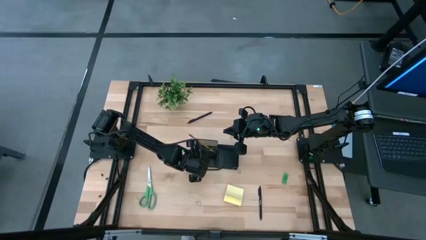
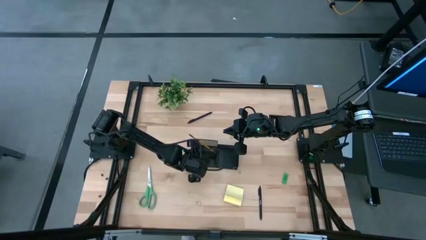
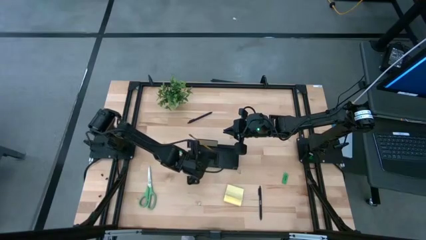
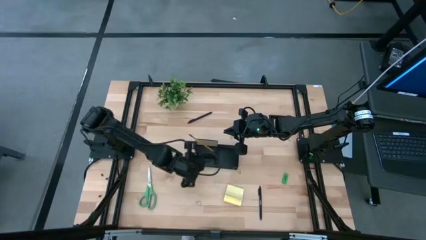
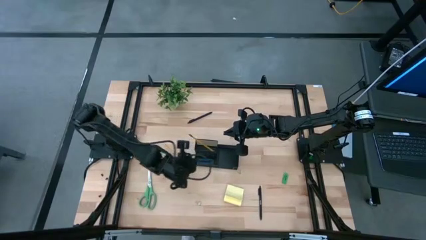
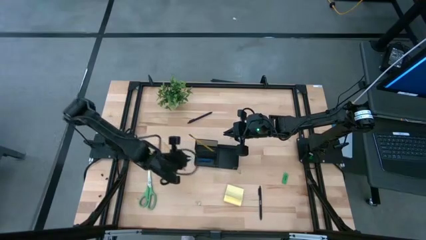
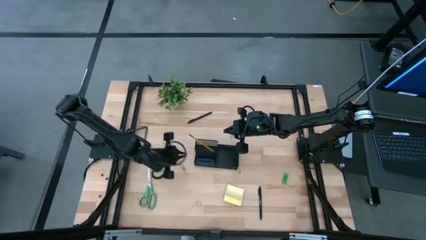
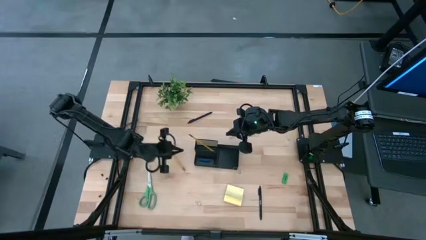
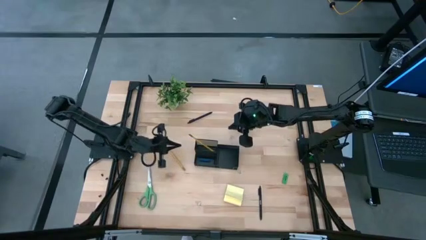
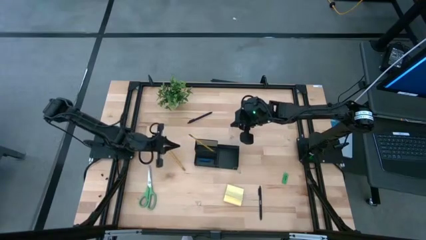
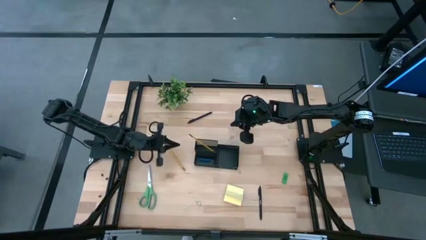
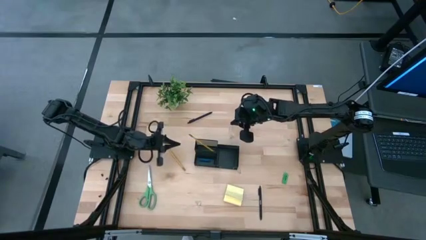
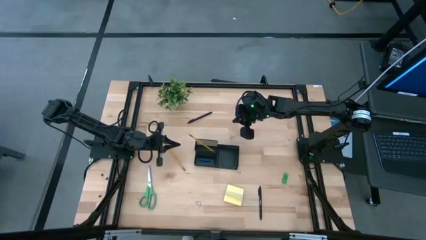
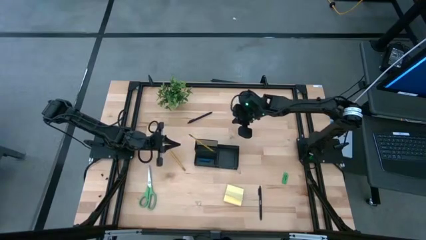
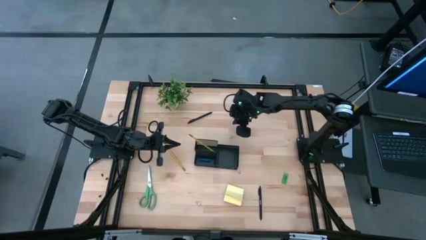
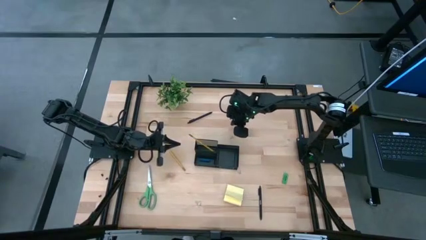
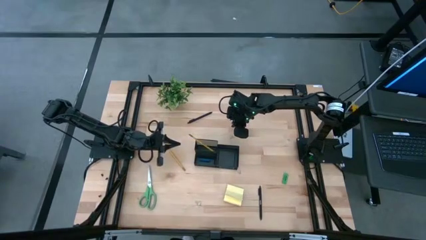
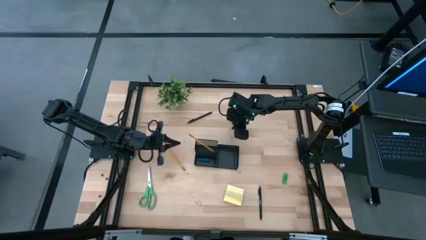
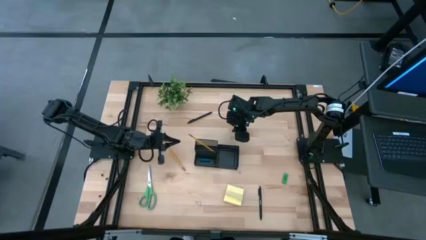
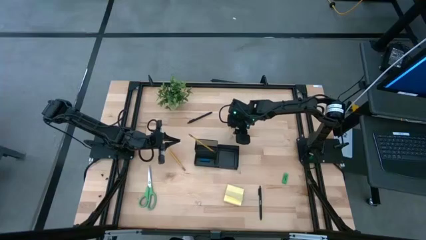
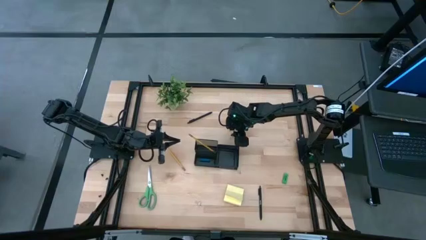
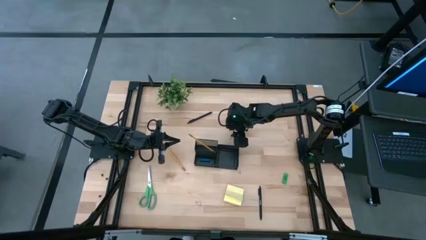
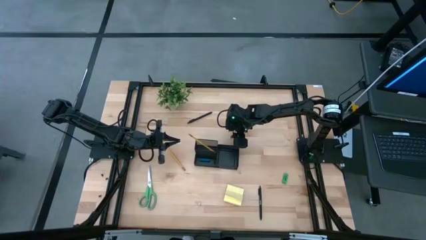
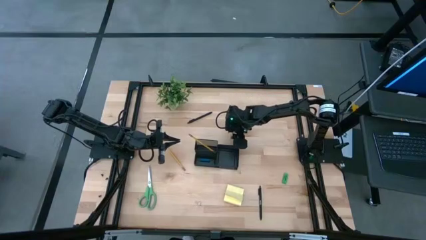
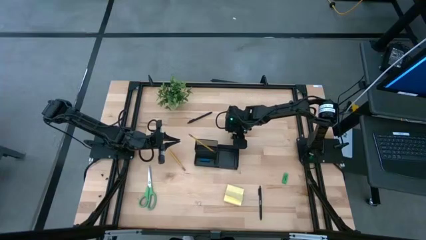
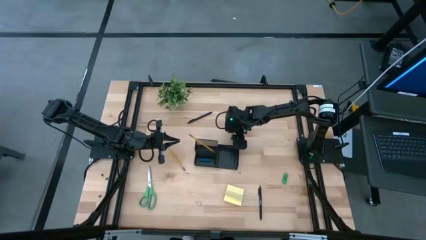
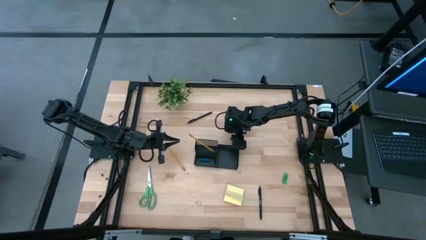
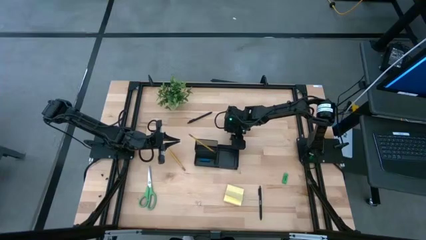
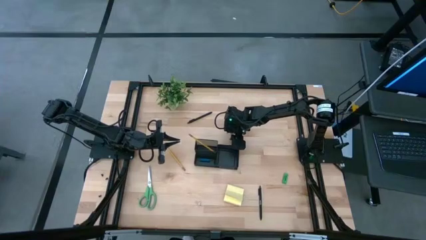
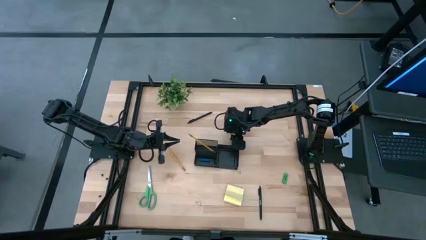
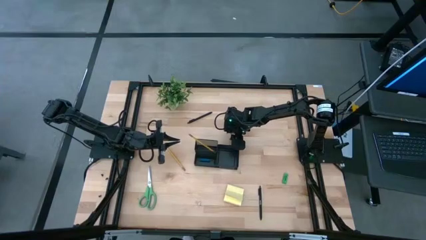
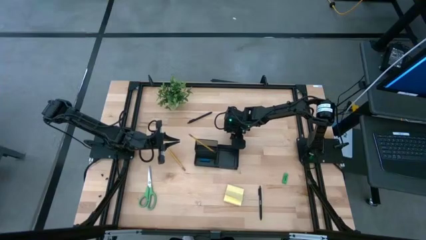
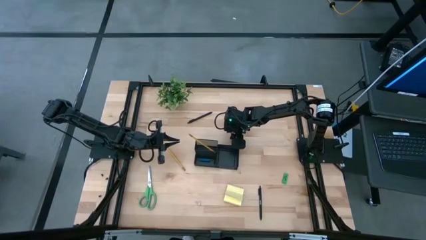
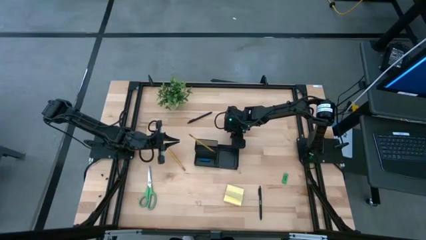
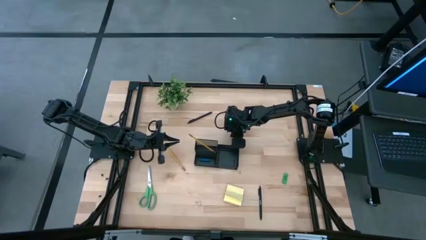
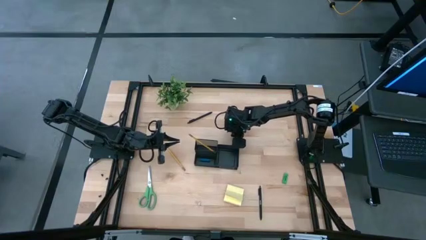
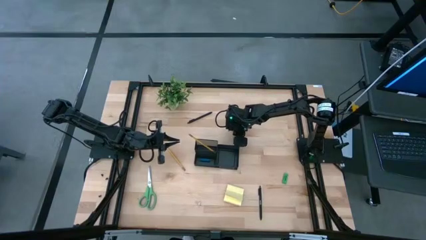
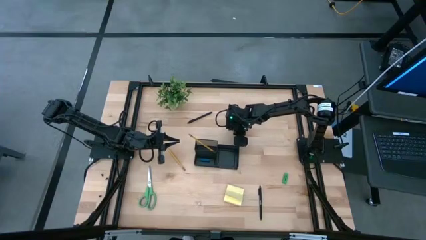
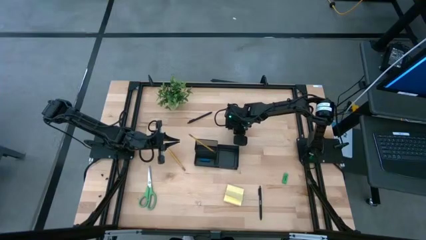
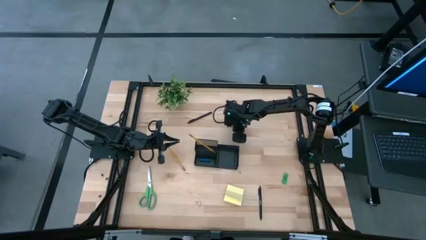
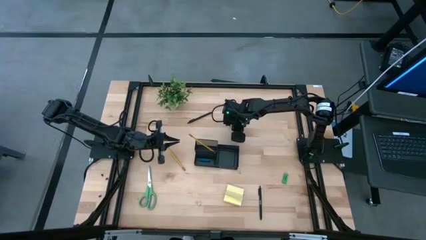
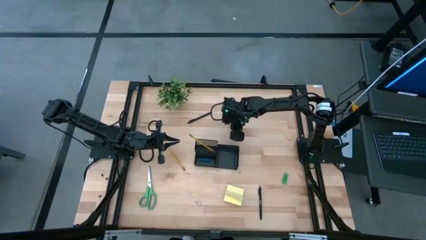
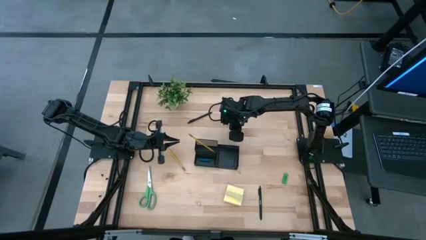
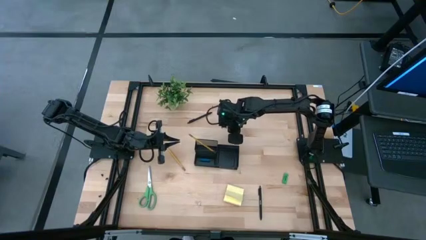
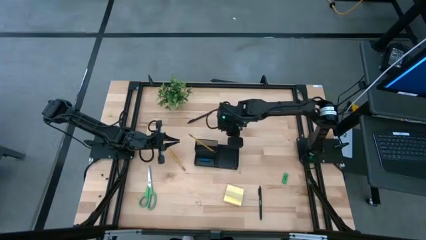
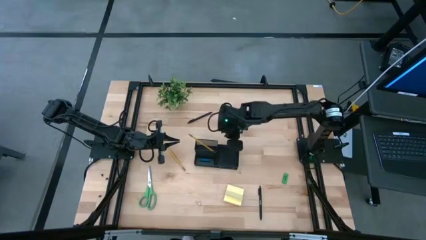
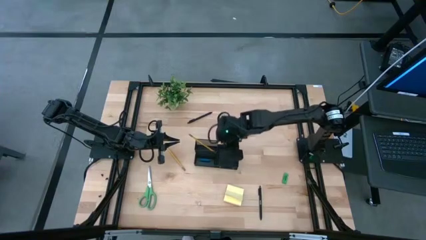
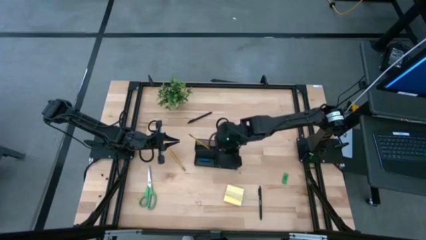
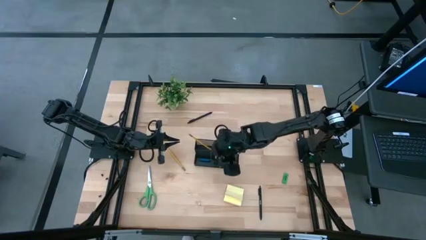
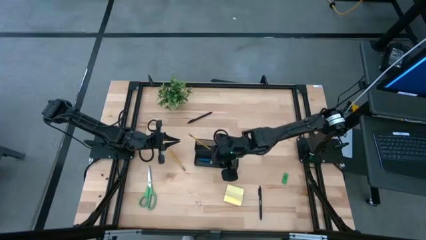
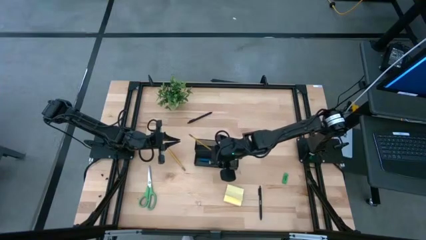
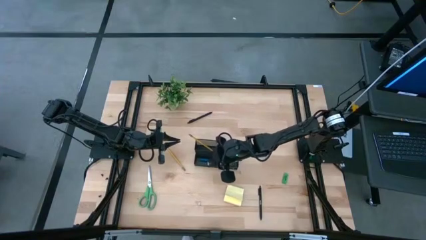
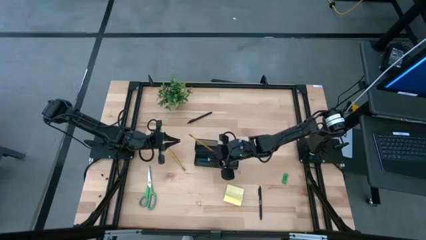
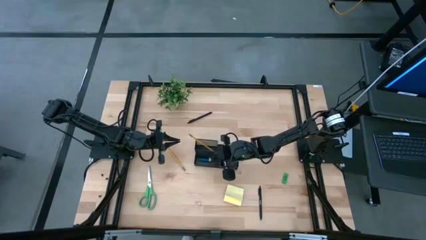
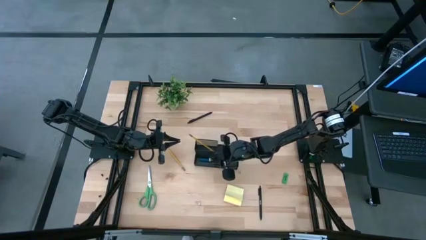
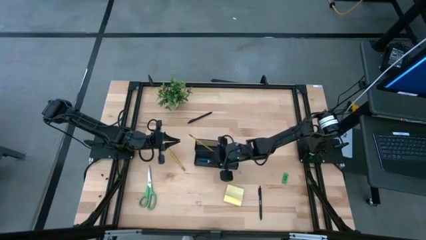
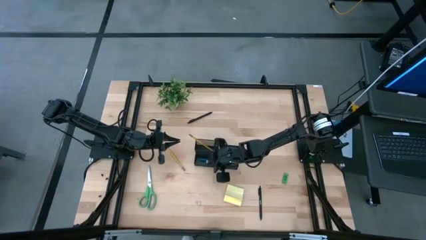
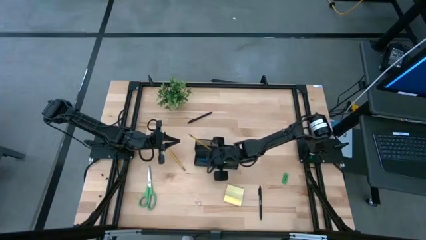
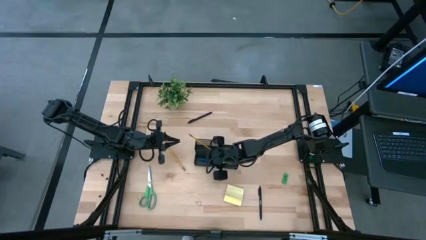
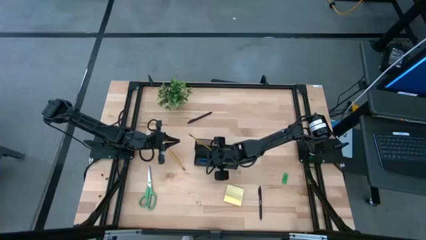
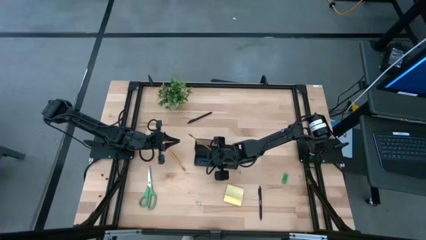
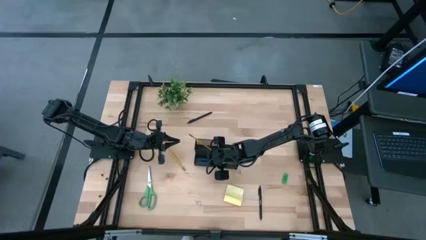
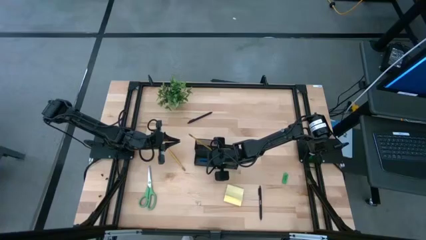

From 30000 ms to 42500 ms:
Task: Pick and place office supplies into organizer
Put the top yellow binder clip into the black desk organizer

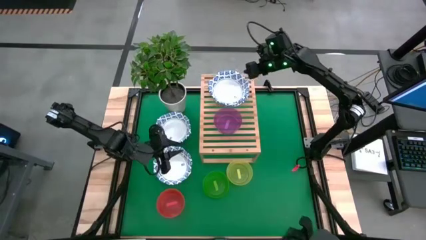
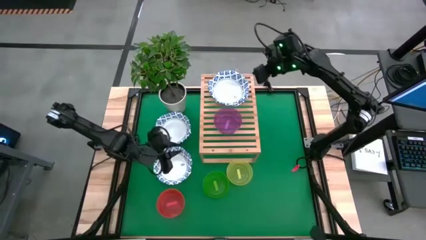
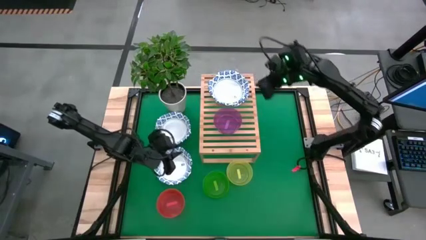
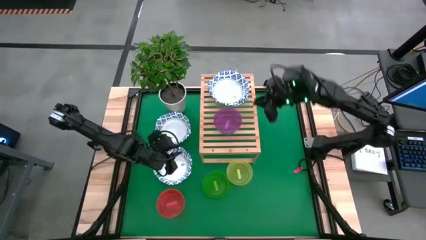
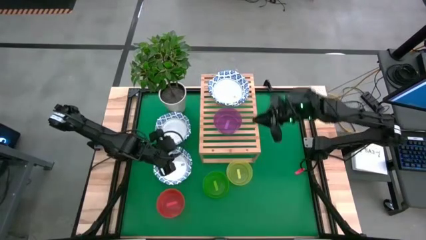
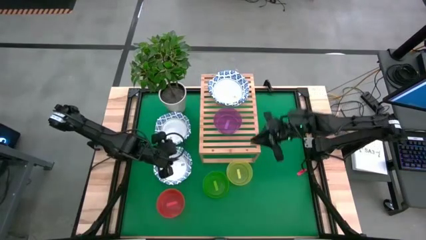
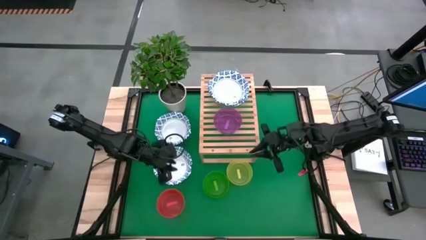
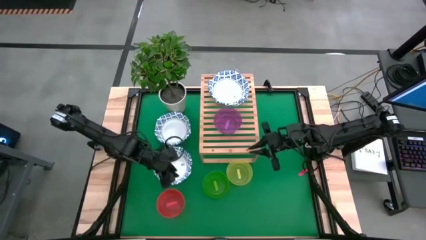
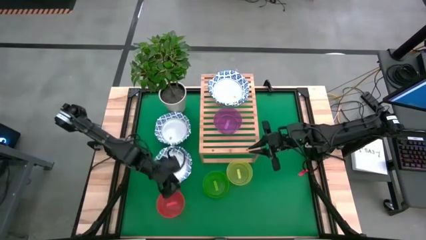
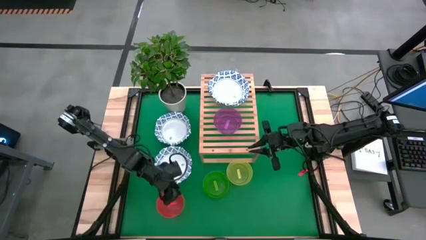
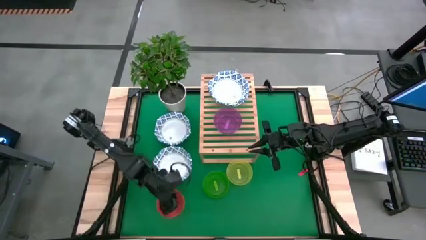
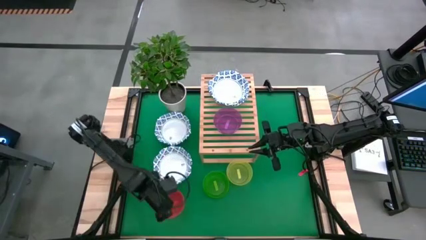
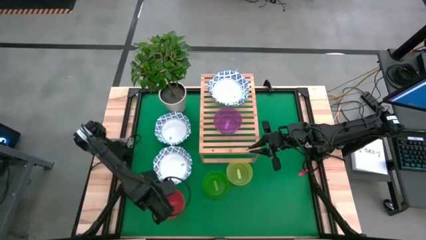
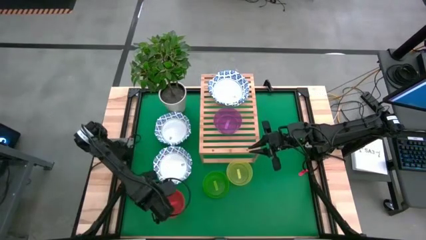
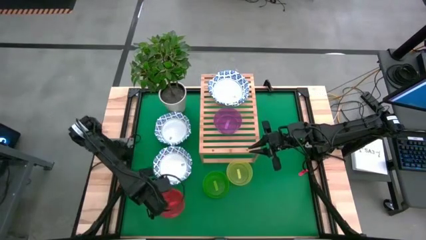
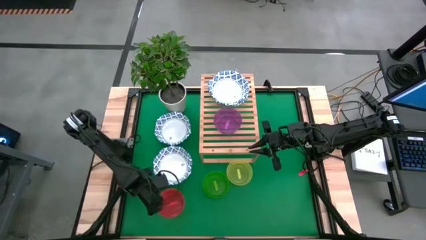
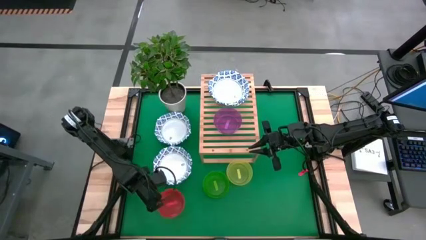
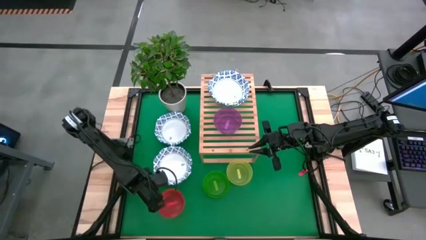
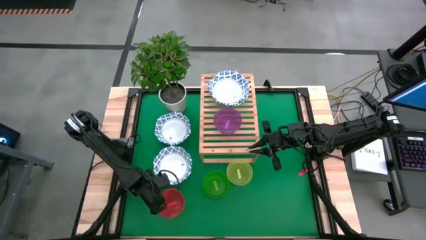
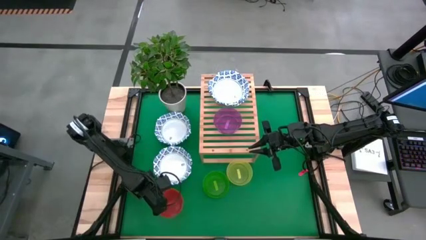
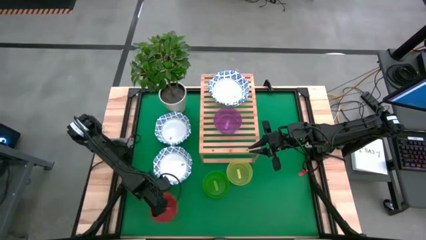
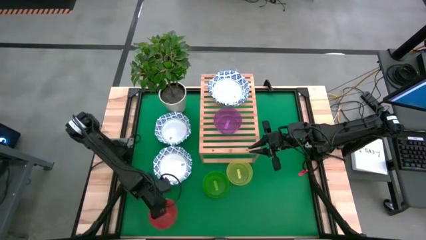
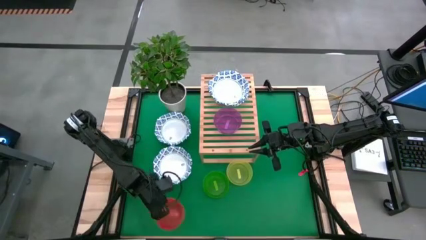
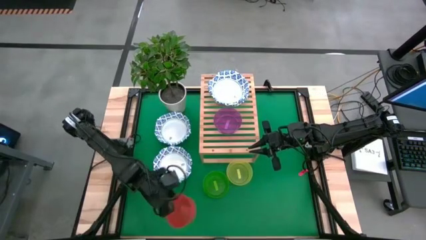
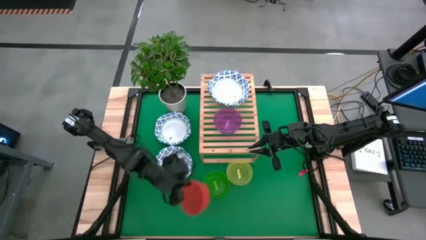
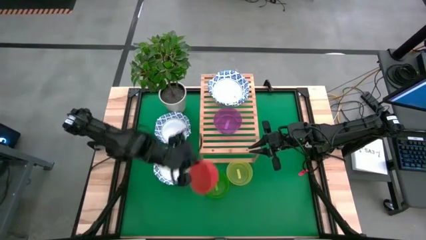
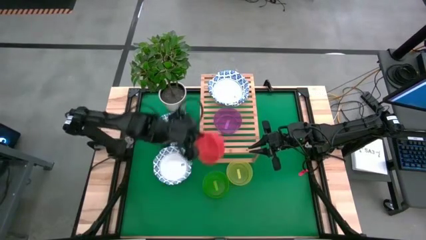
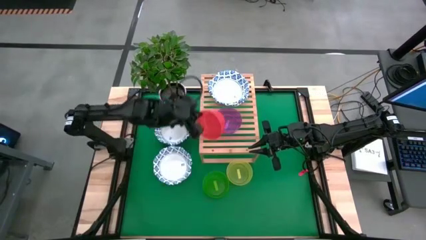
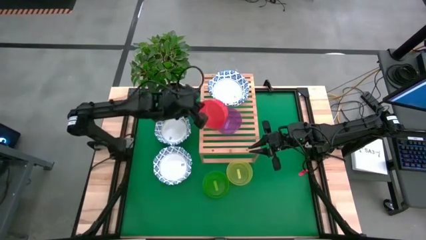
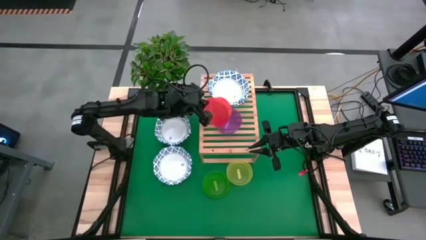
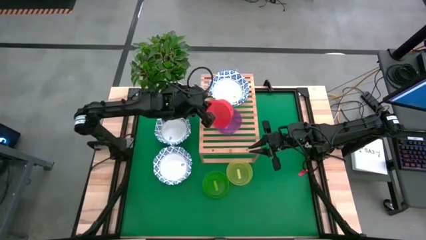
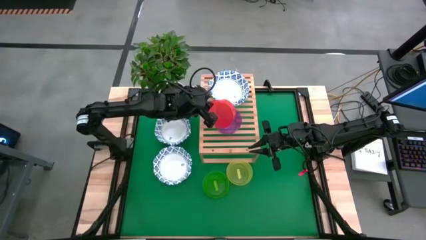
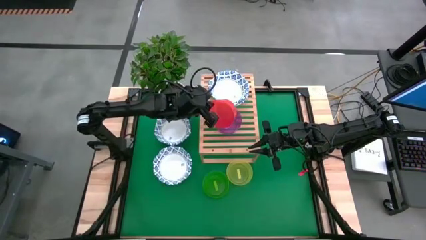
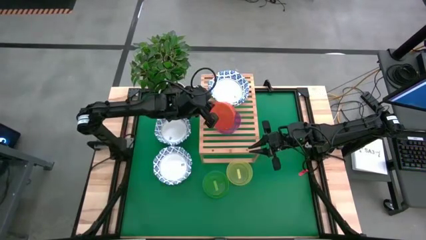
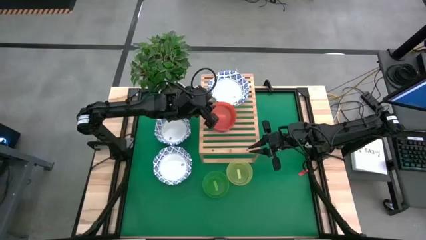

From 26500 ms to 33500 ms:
Task: Place and stack bowls onto a shelf
Stack the red bowl on top of the violet bowl on the shelf
